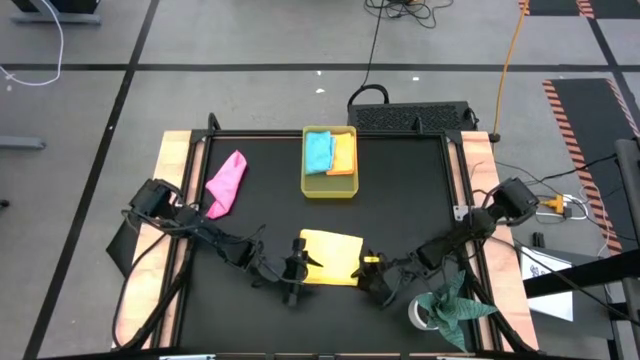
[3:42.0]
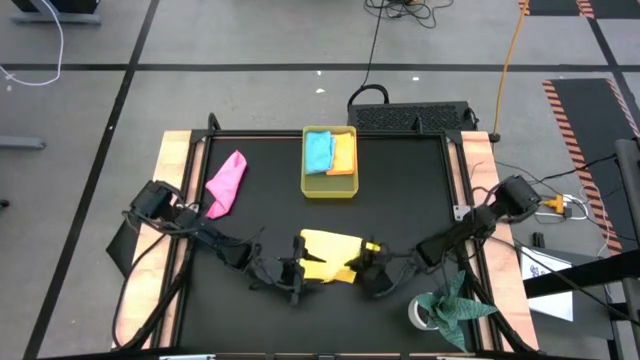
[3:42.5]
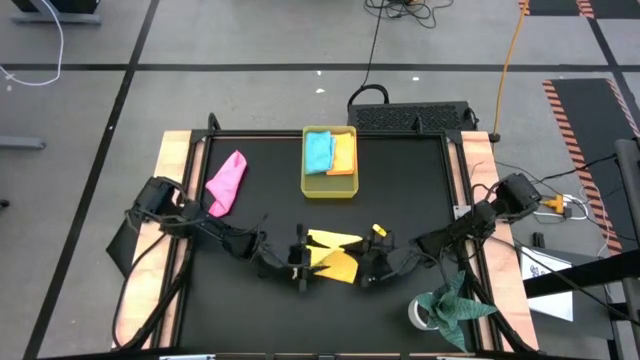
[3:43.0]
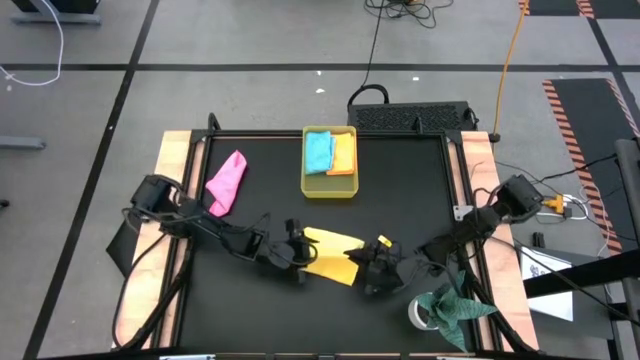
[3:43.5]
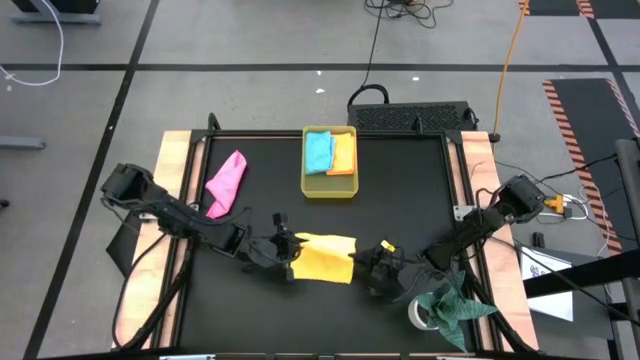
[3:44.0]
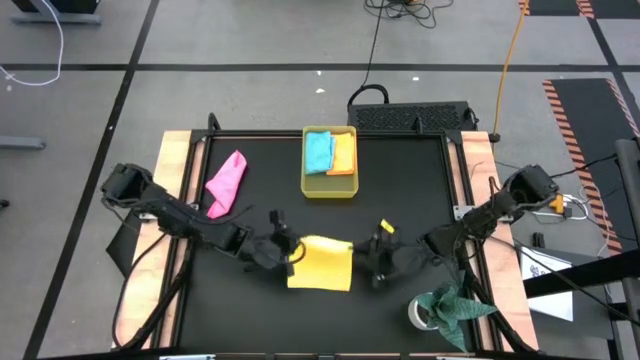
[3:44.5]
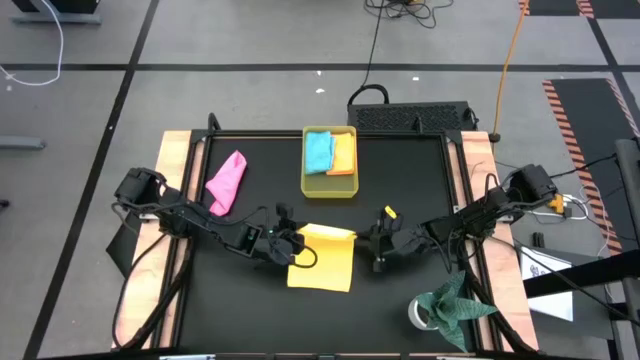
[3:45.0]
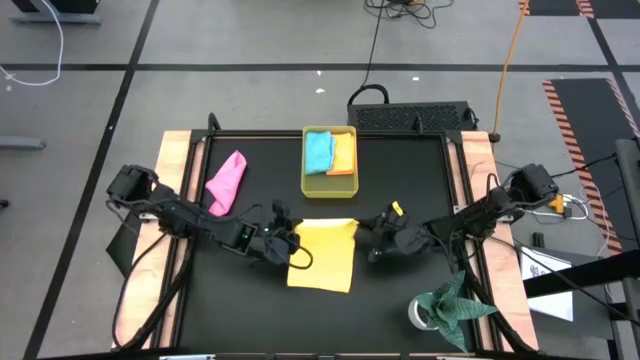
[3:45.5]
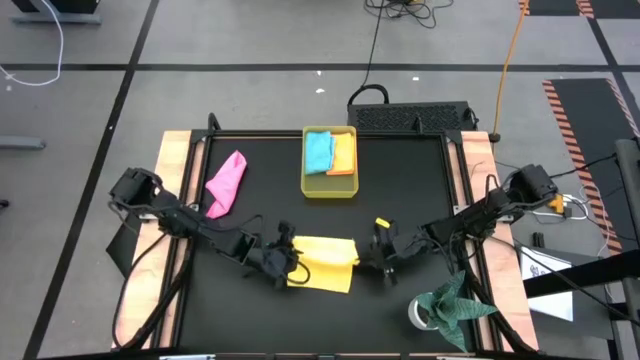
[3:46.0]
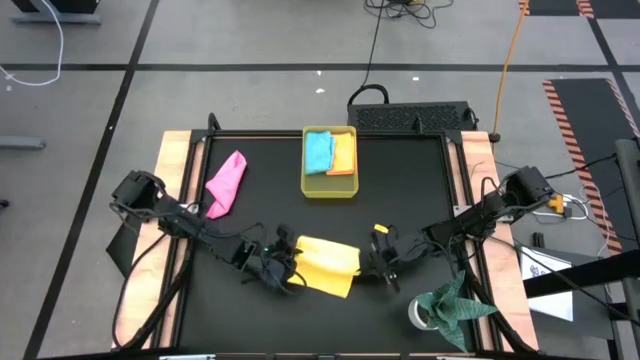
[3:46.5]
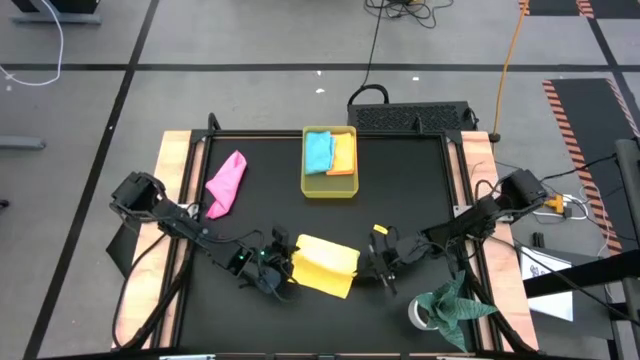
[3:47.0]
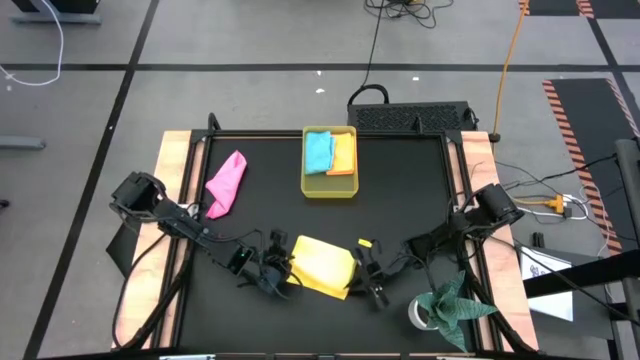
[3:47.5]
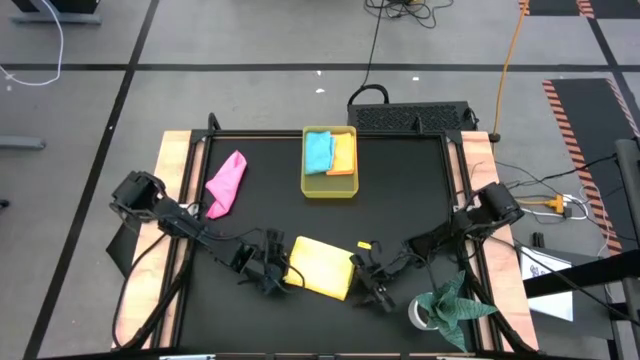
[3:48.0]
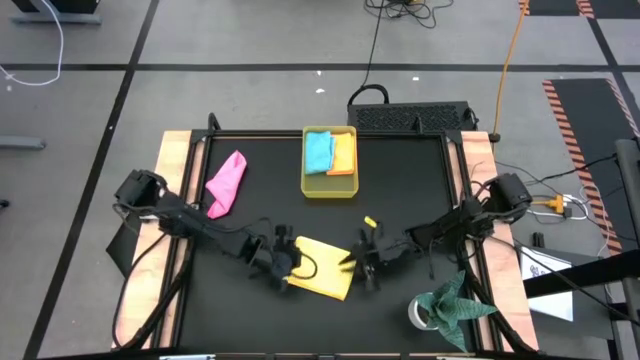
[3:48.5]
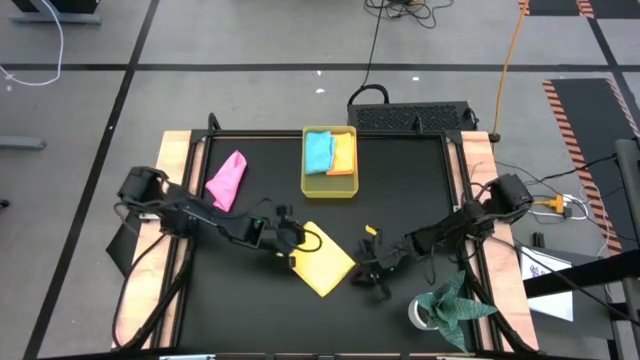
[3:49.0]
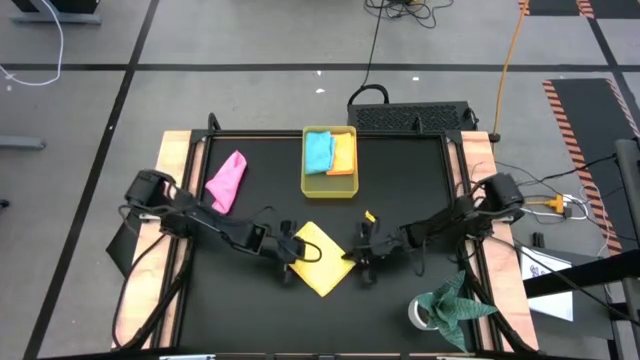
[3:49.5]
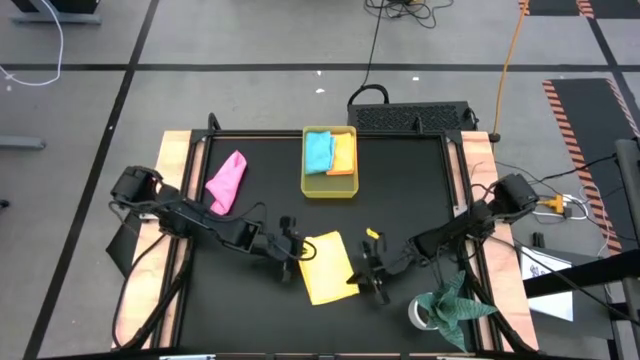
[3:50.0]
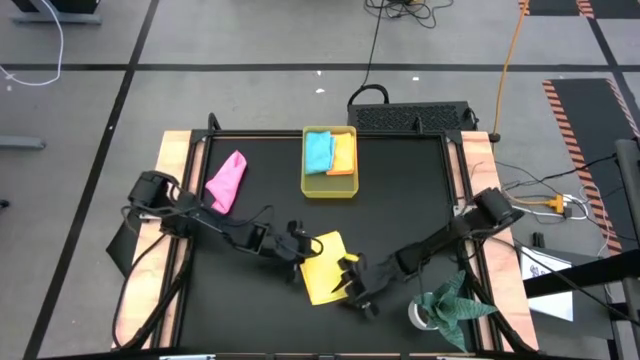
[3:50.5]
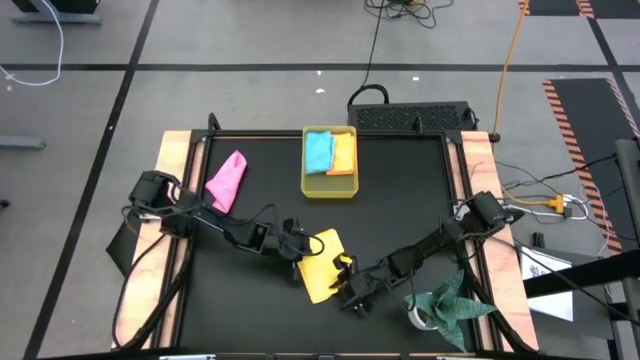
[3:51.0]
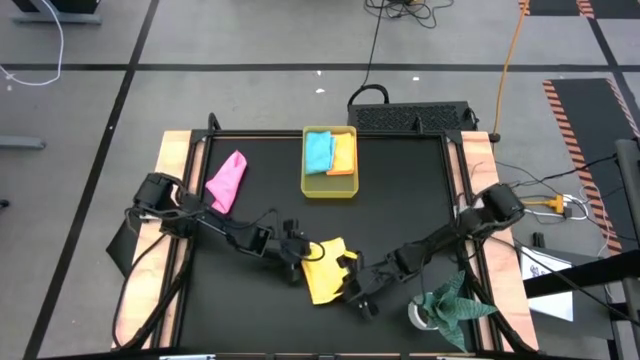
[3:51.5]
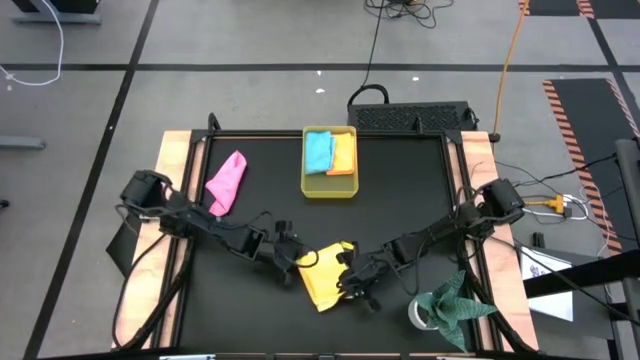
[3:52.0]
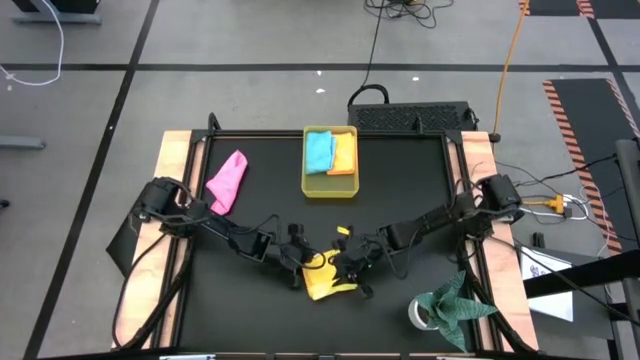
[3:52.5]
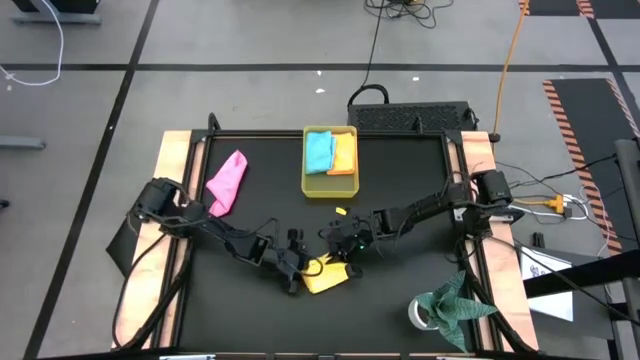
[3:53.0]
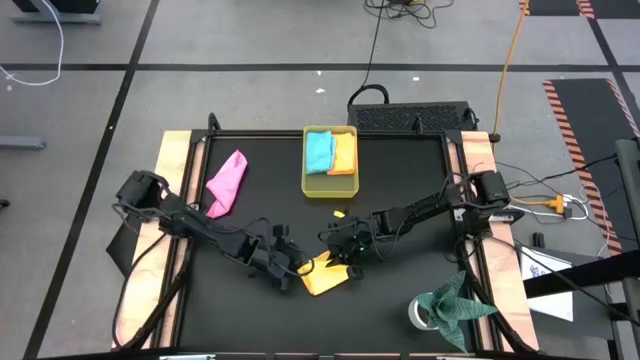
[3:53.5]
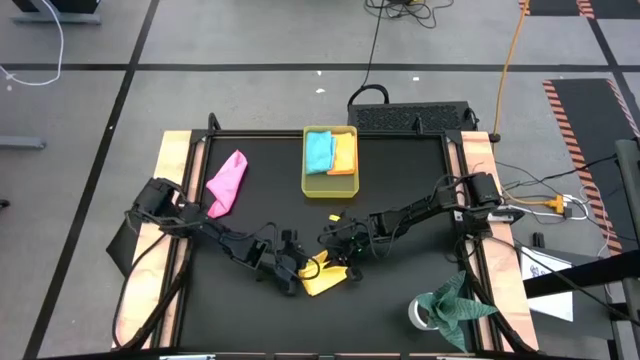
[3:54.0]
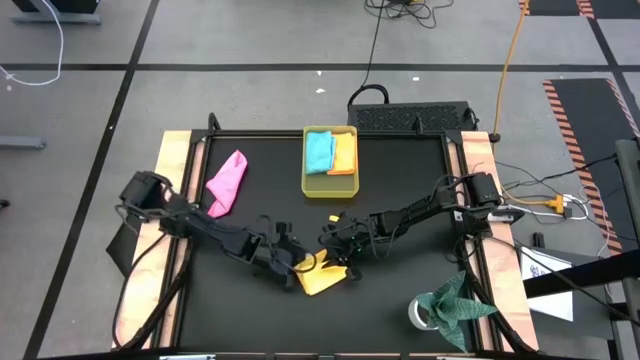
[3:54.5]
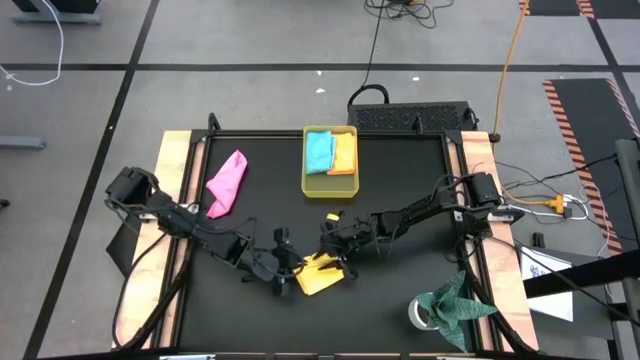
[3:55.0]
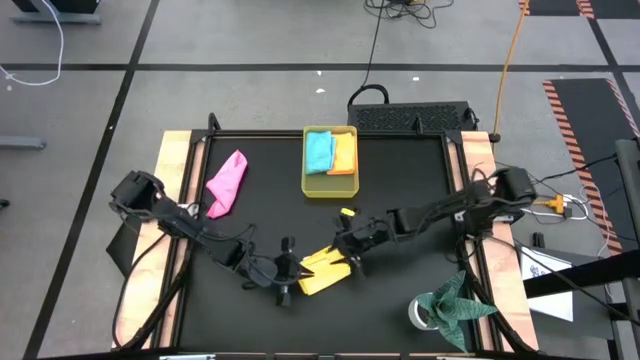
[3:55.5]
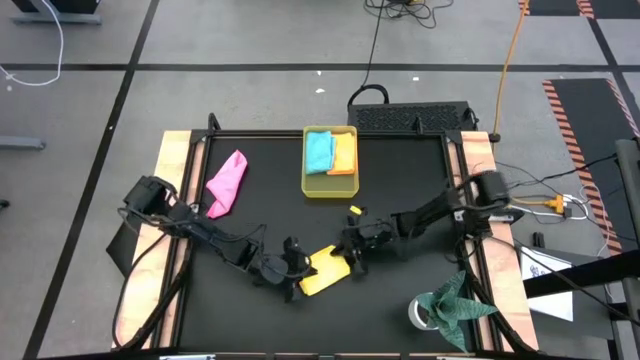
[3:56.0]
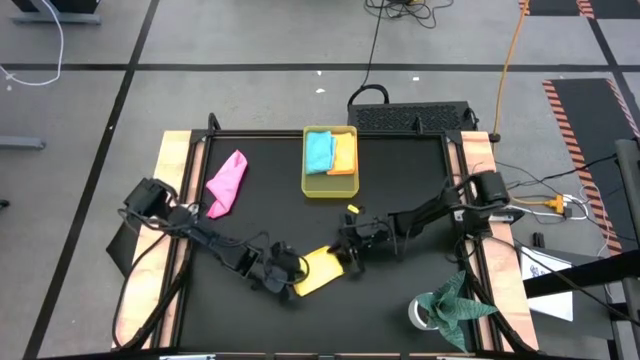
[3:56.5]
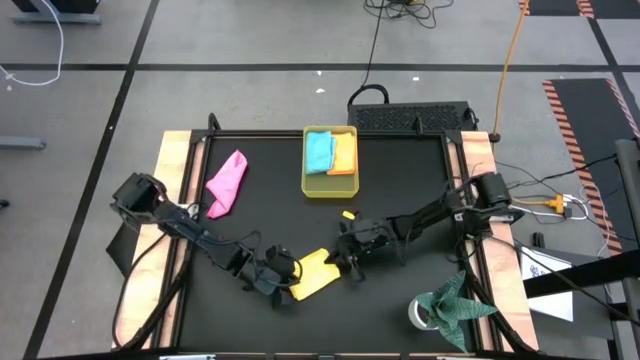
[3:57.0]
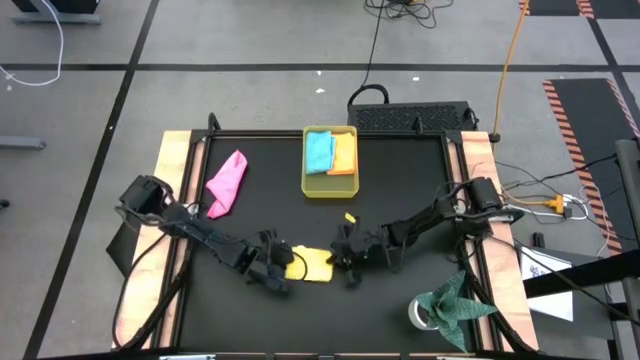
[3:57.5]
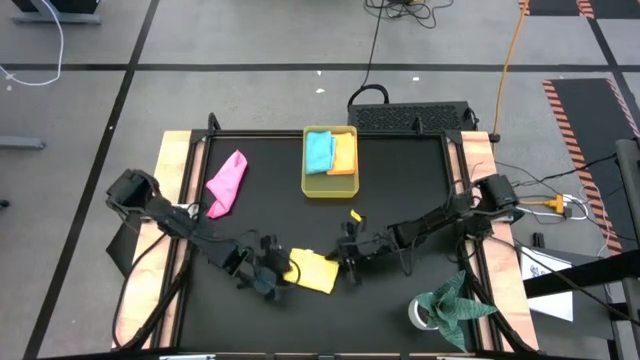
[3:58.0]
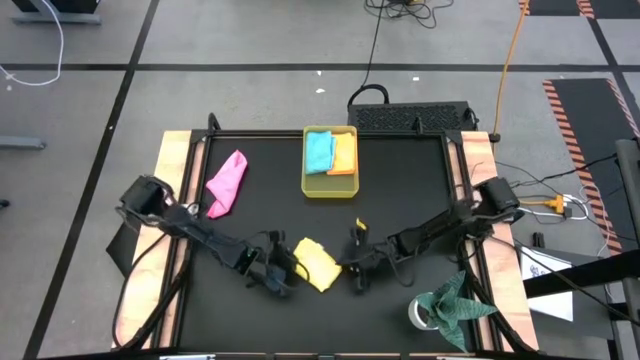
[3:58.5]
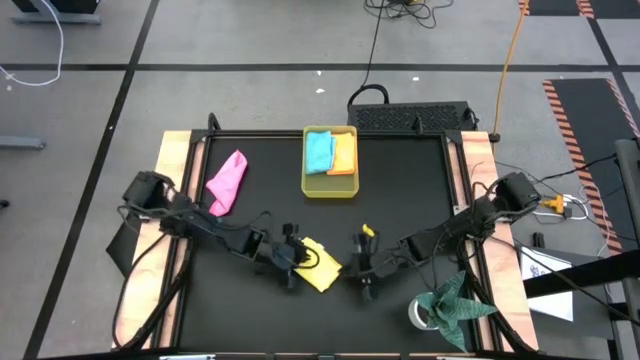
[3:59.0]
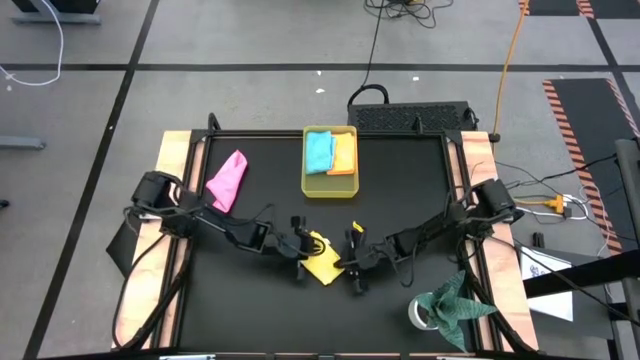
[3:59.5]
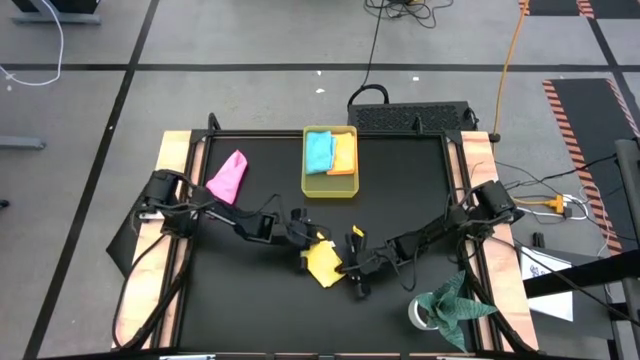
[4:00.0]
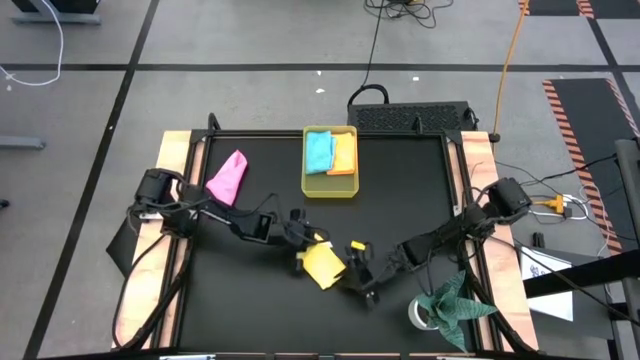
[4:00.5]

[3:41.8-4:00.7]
Task: Fold microfiber towels
Fold the yellow towel
